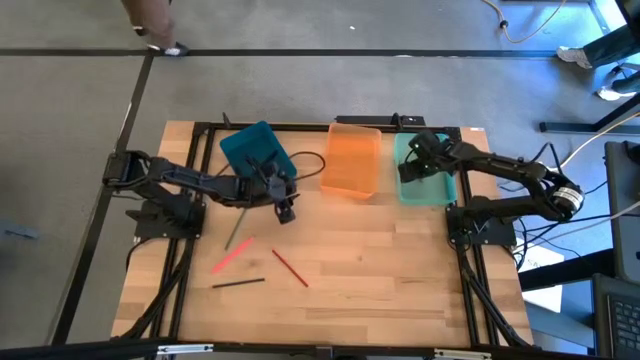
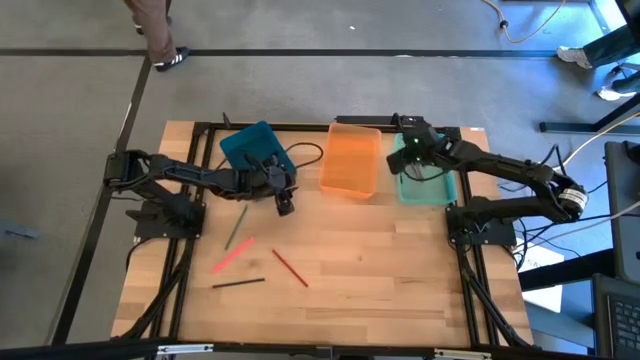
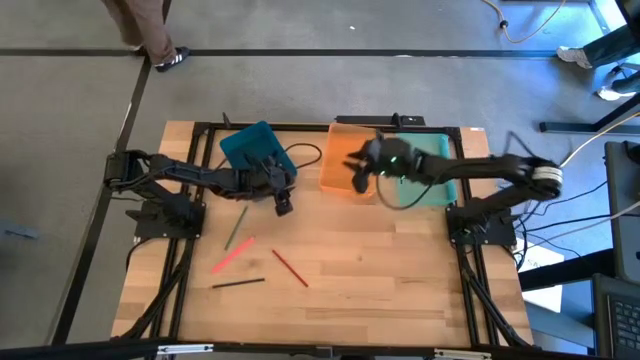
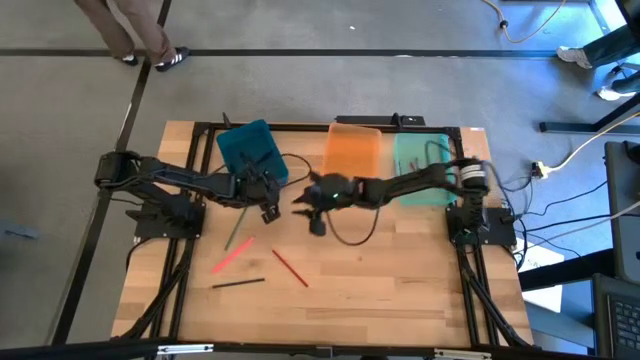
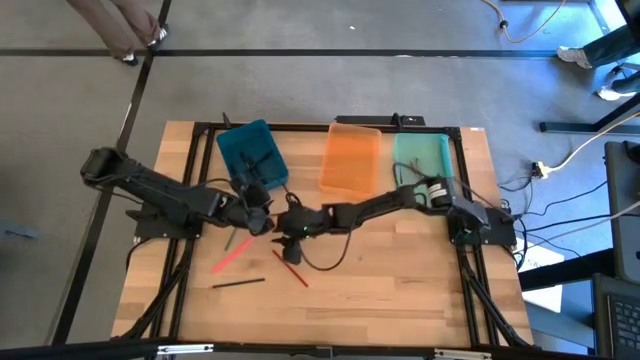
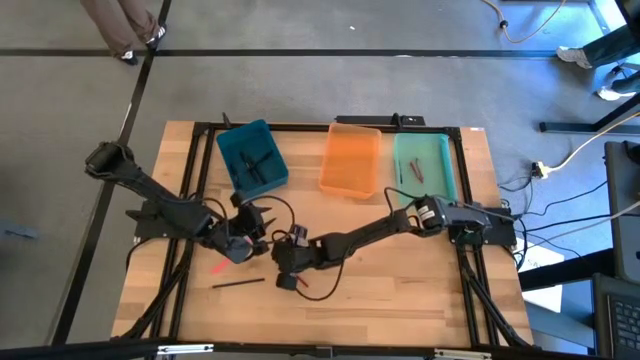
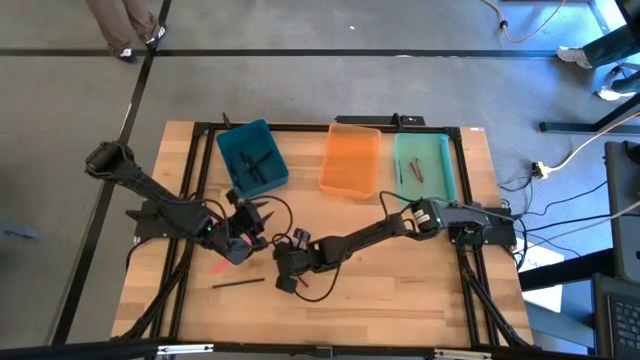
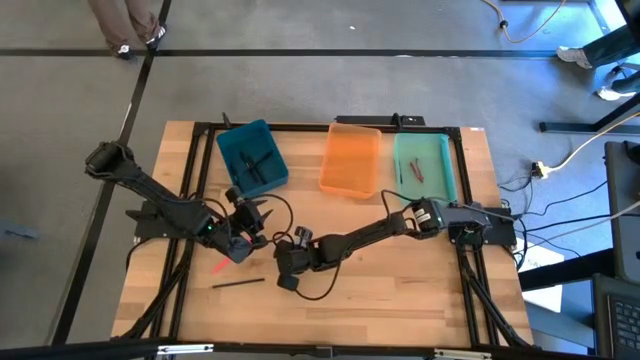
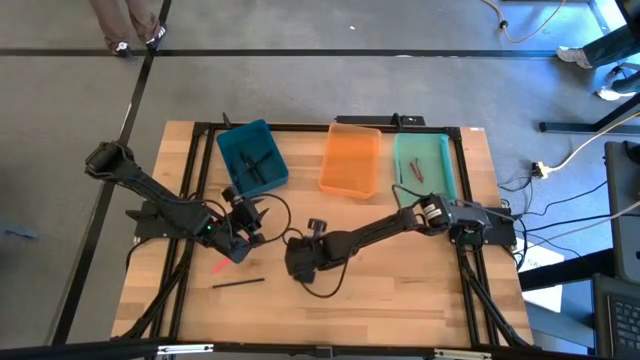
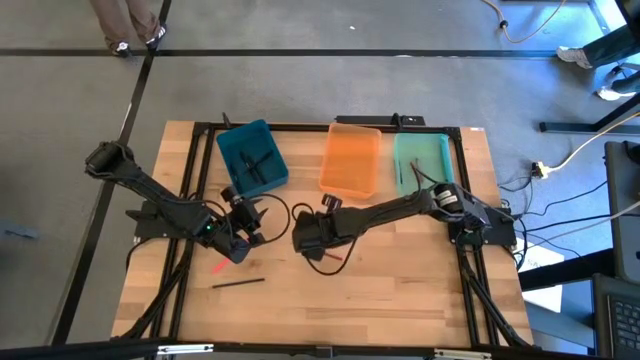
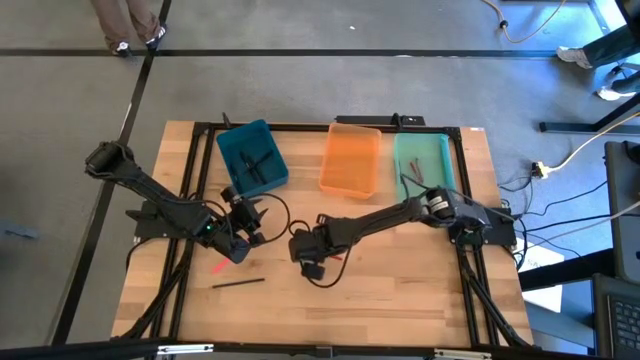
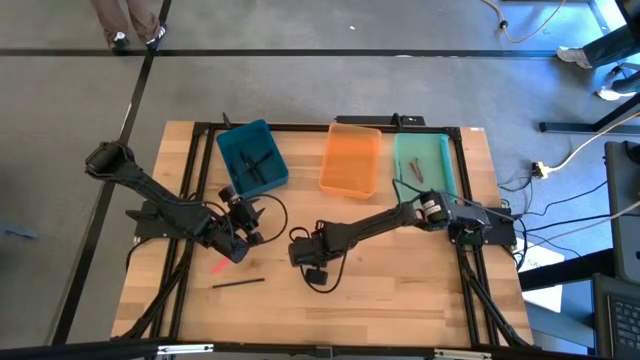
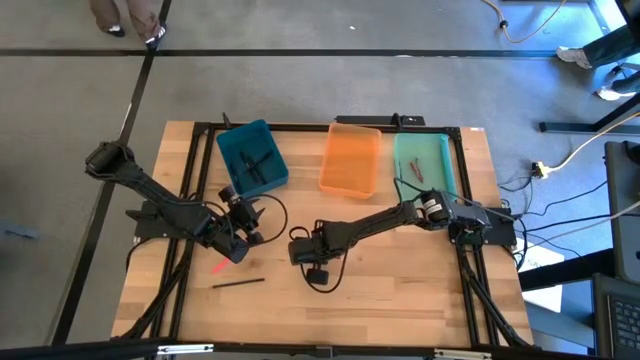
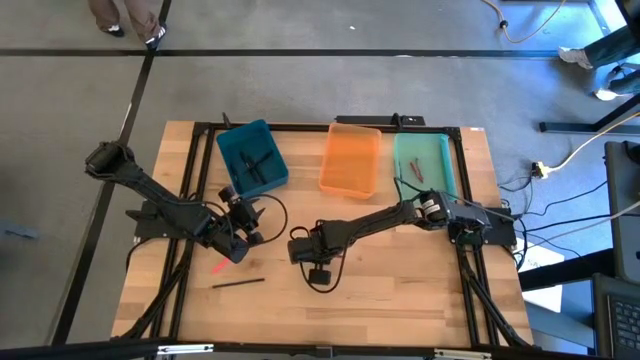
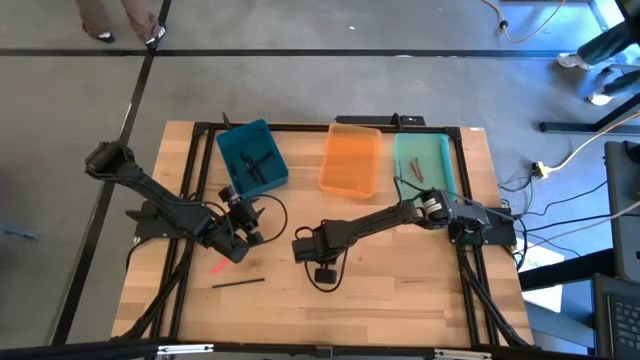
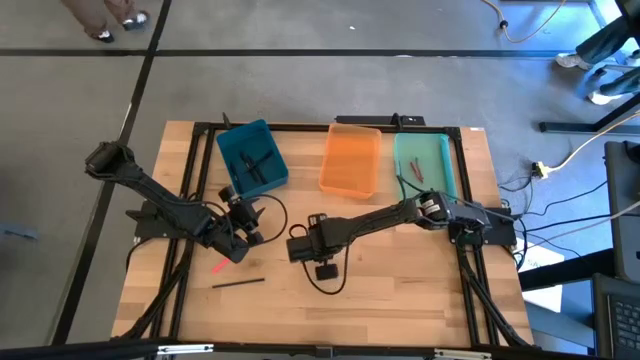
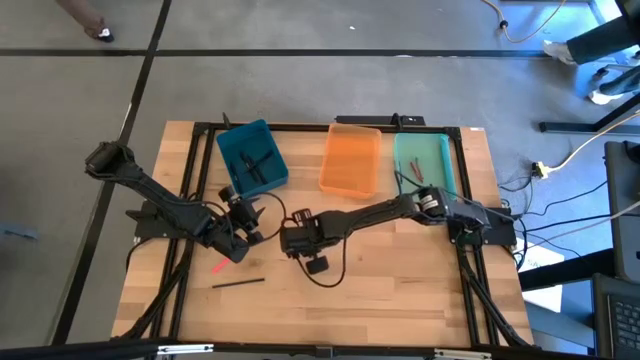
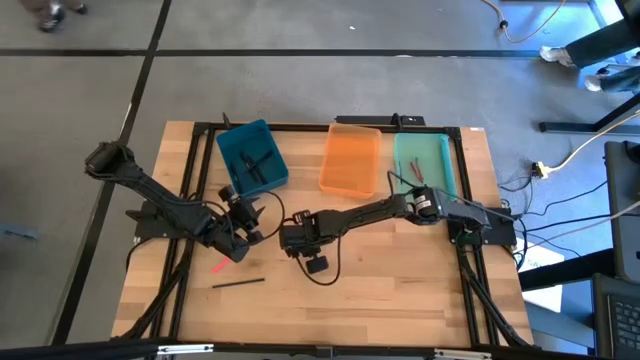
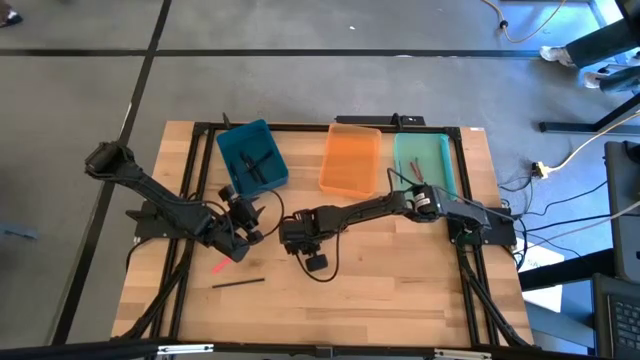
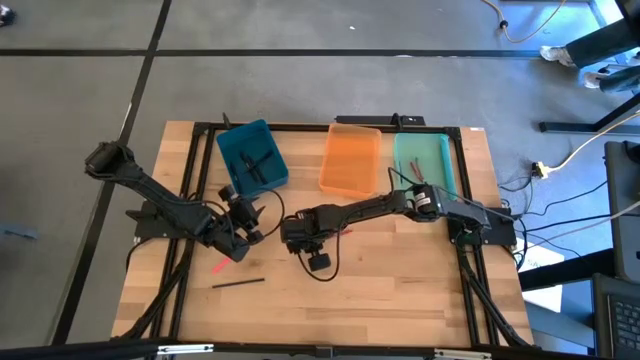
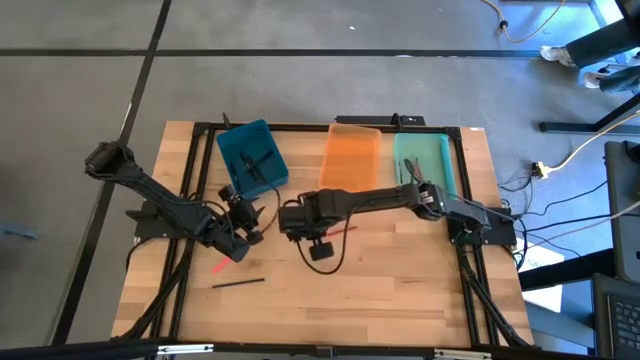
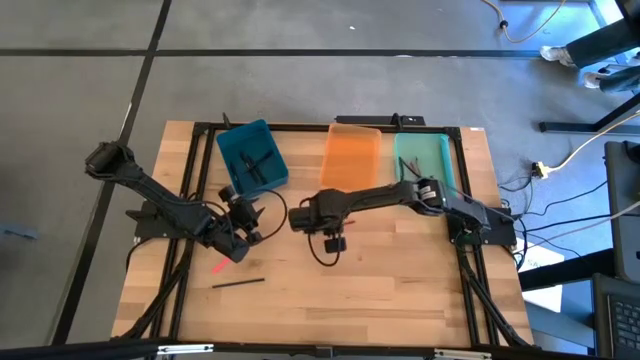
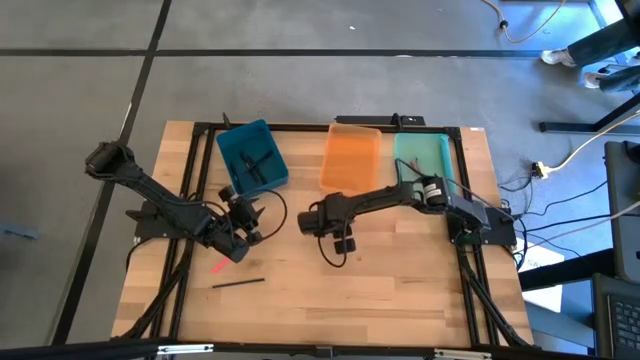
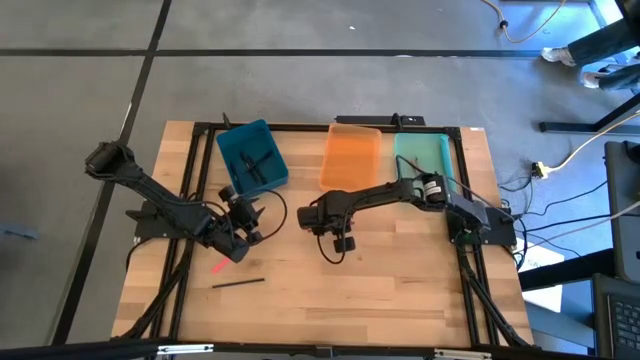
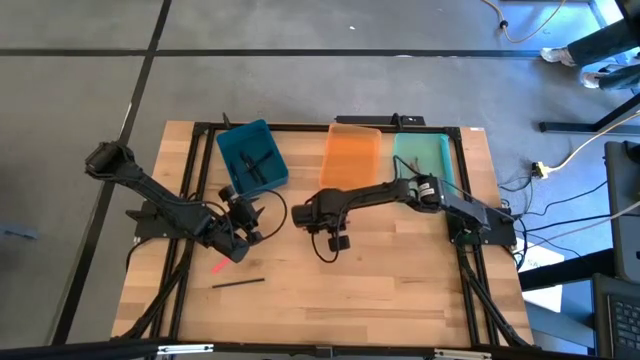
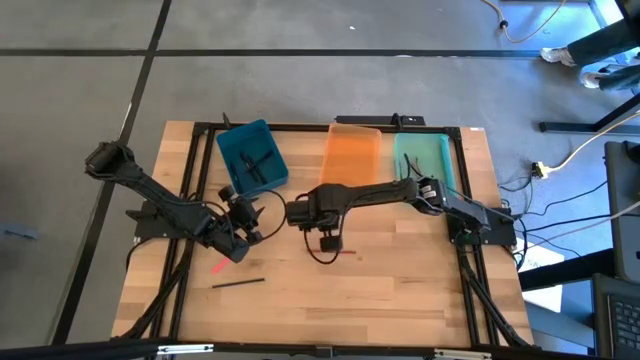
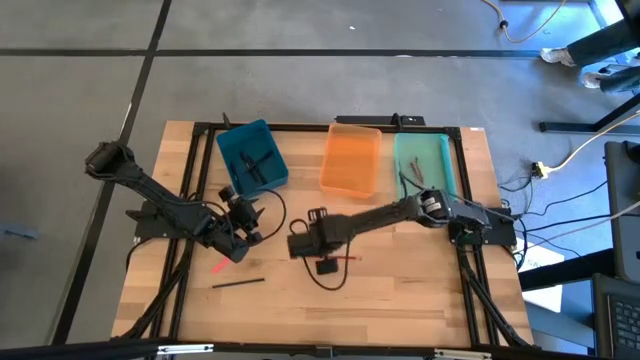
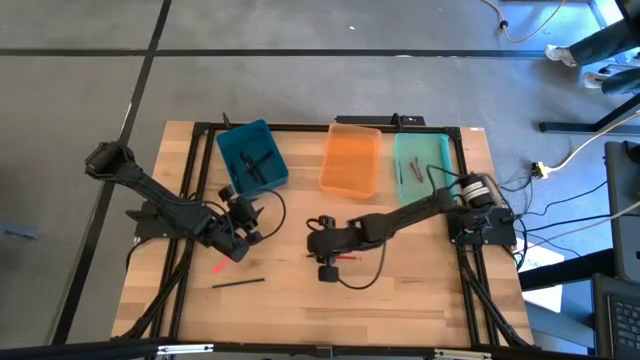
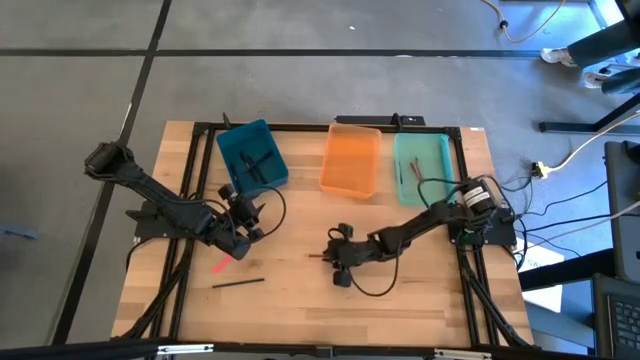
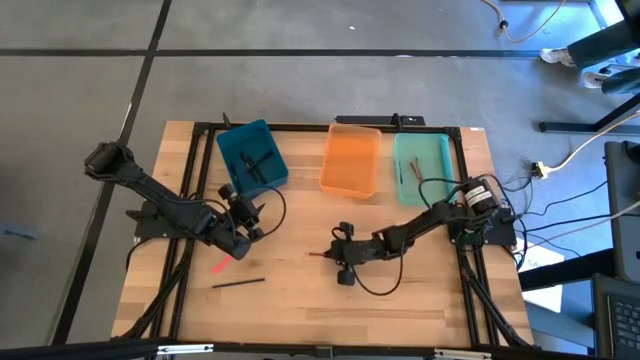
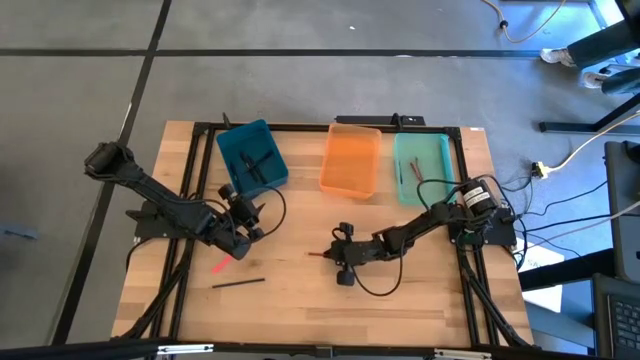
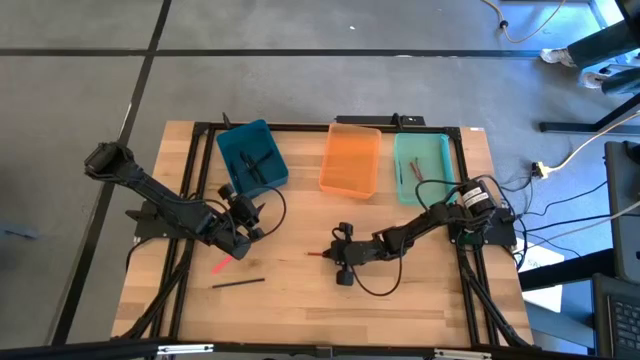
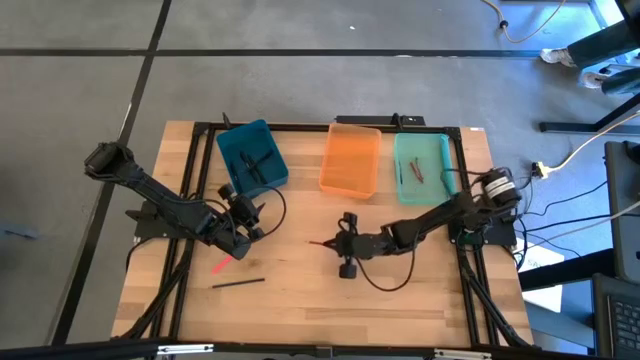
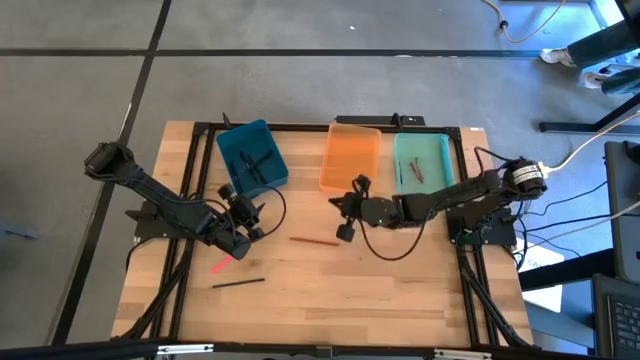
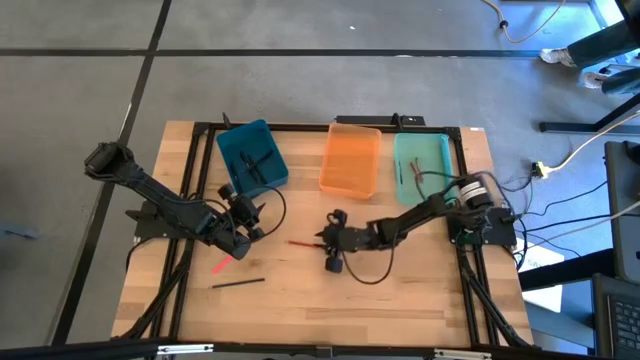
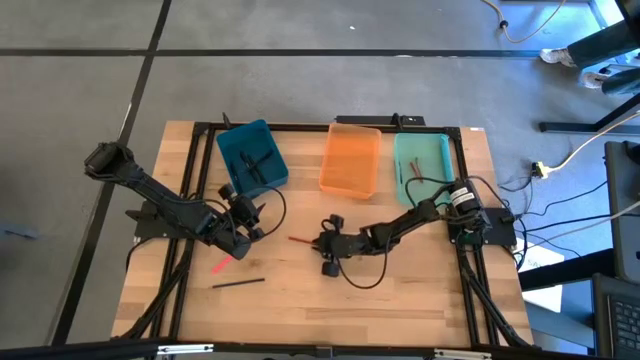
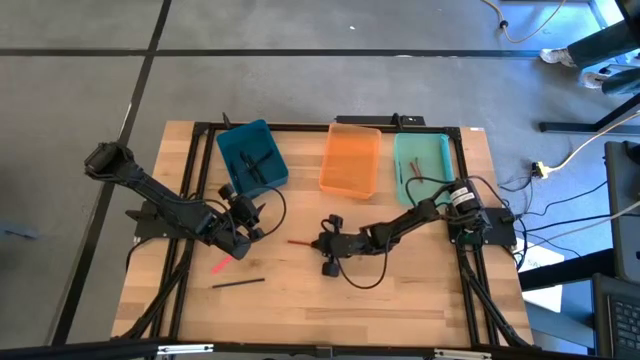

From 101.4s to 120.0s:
Task: Sort crayons/erasers/pens/pencils in bins
Put the red pencil into the orange bin

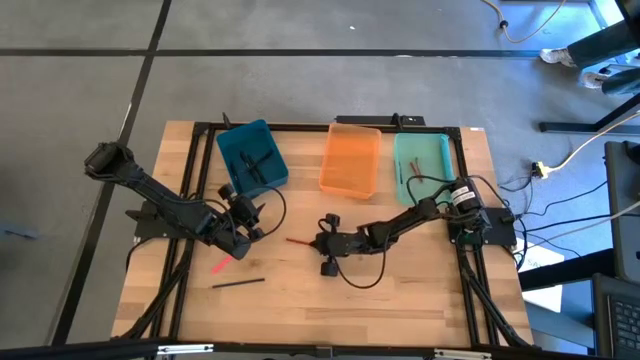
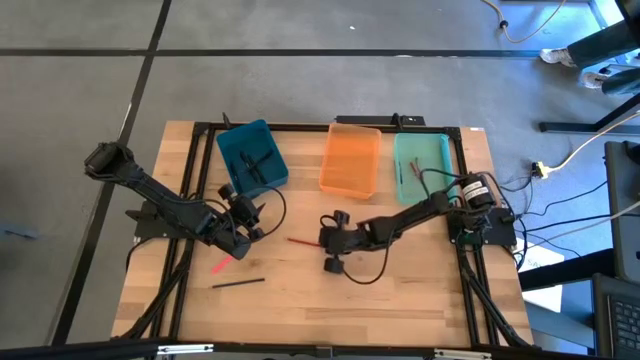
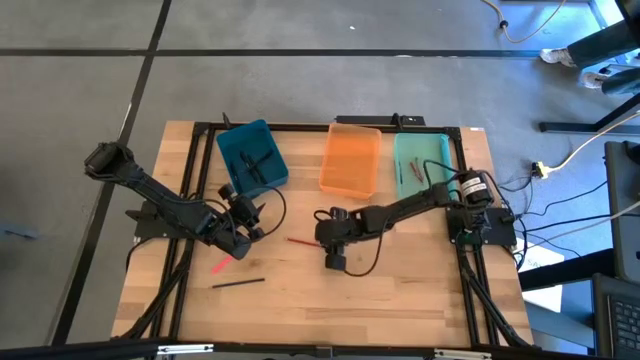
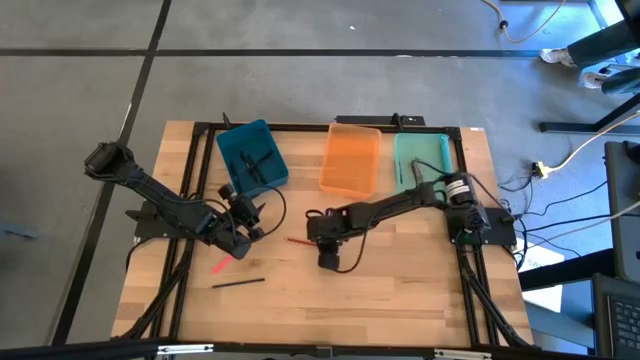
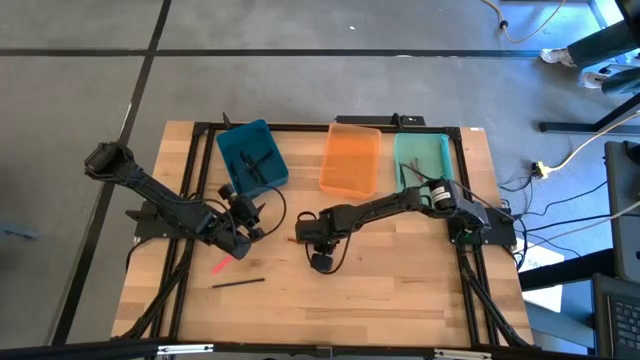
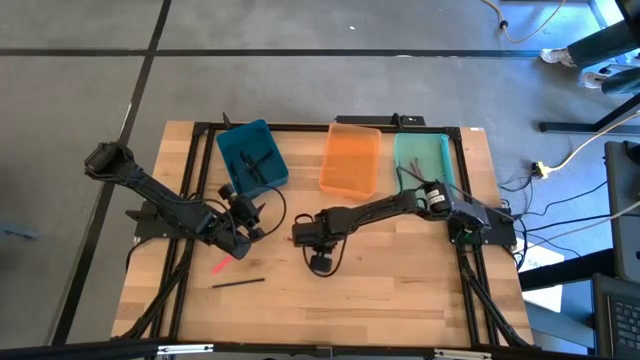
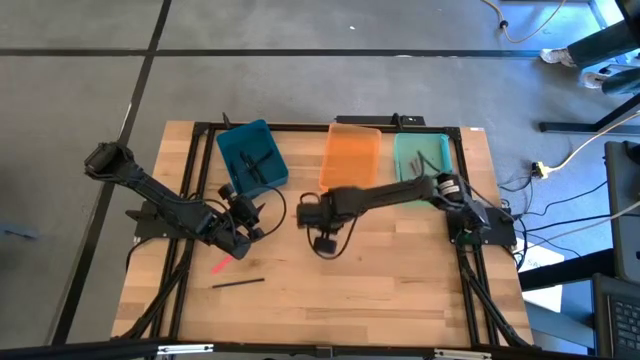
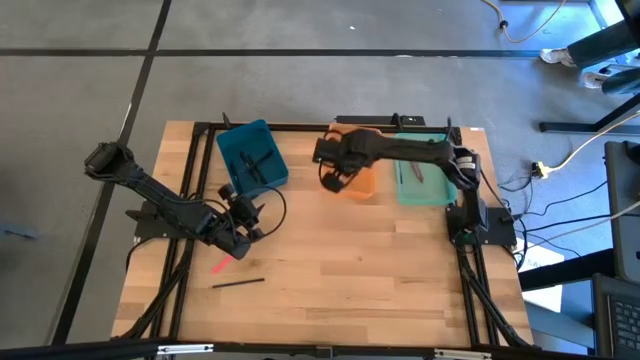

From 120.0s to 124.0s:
Put the red pencil into the orange bin
